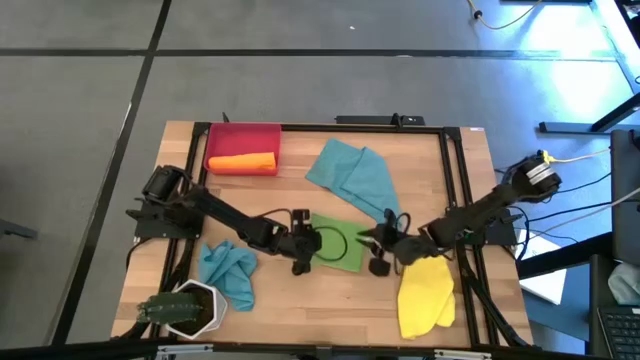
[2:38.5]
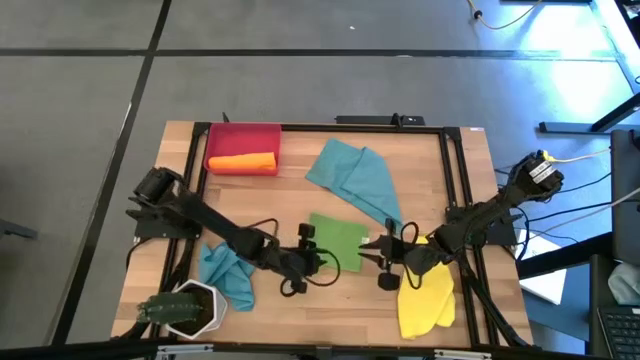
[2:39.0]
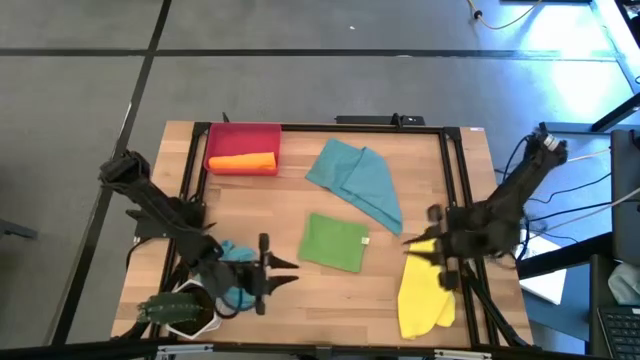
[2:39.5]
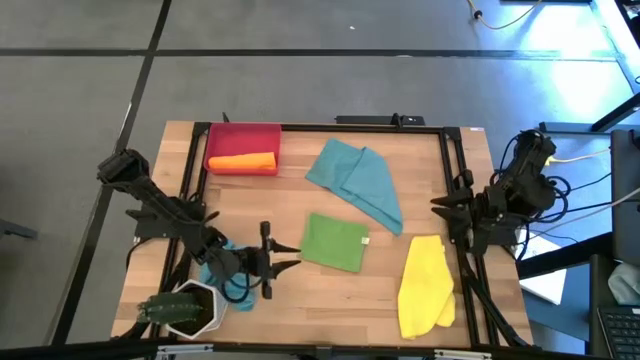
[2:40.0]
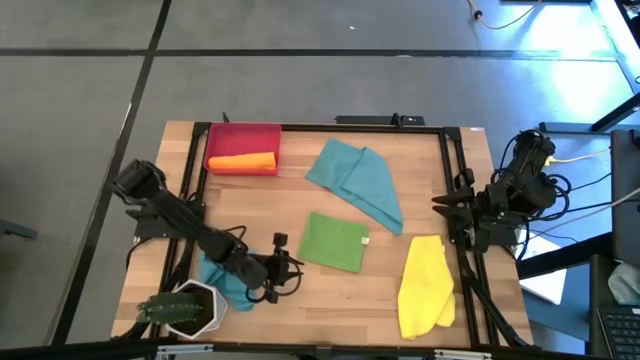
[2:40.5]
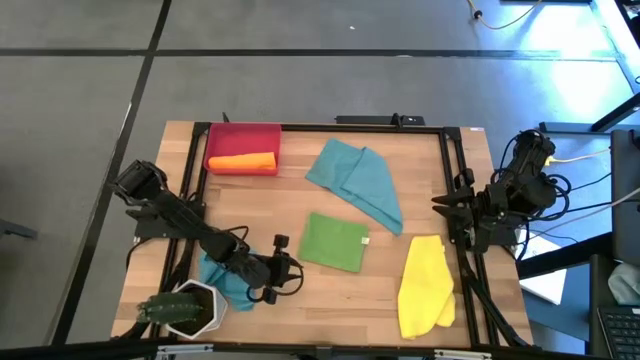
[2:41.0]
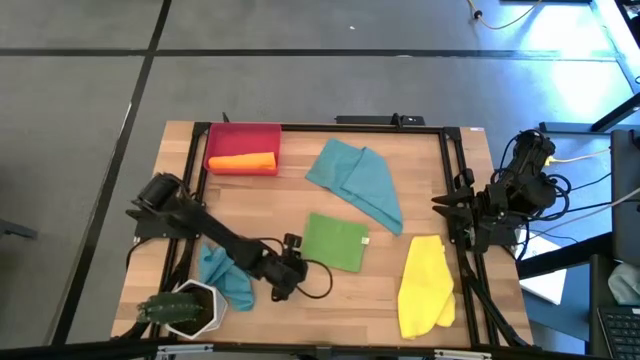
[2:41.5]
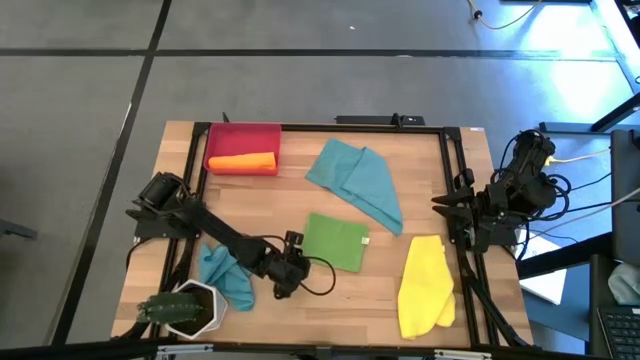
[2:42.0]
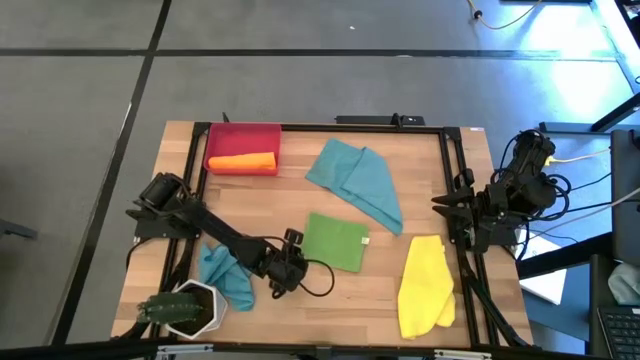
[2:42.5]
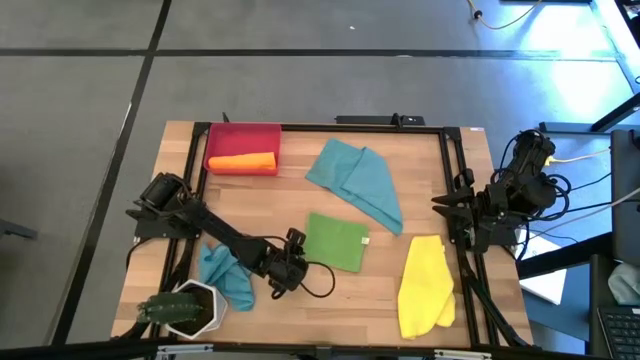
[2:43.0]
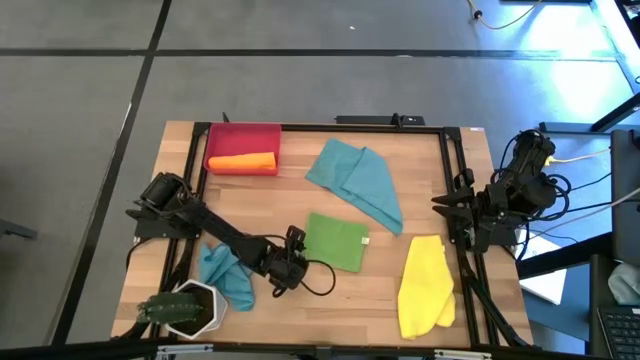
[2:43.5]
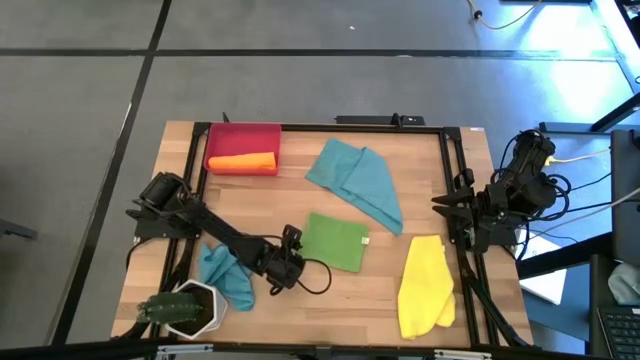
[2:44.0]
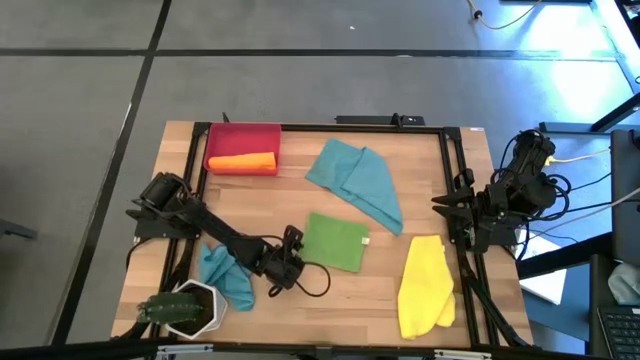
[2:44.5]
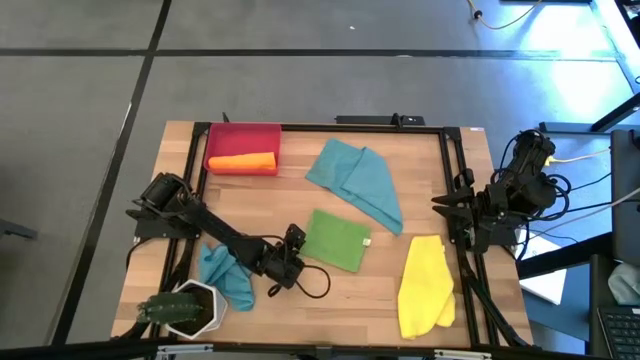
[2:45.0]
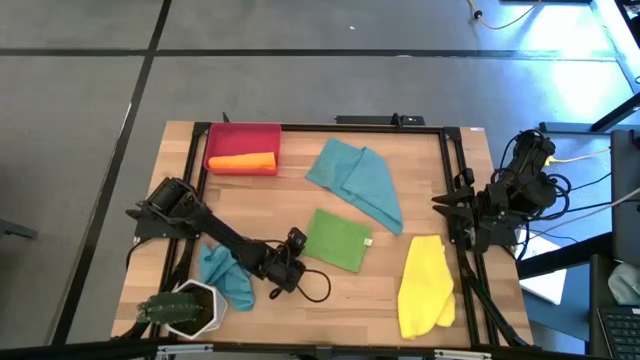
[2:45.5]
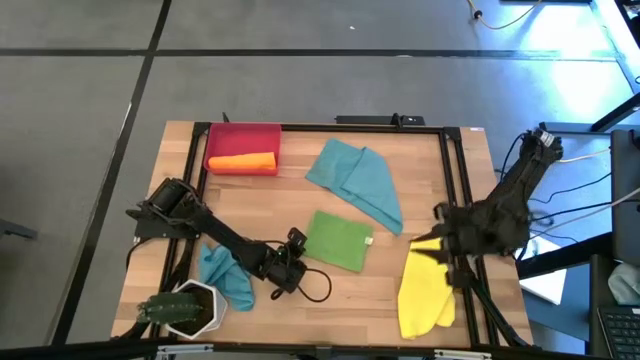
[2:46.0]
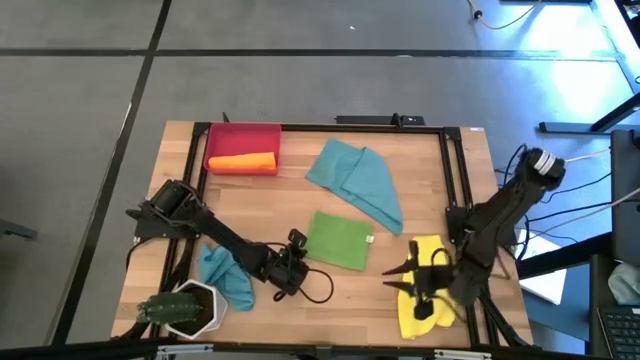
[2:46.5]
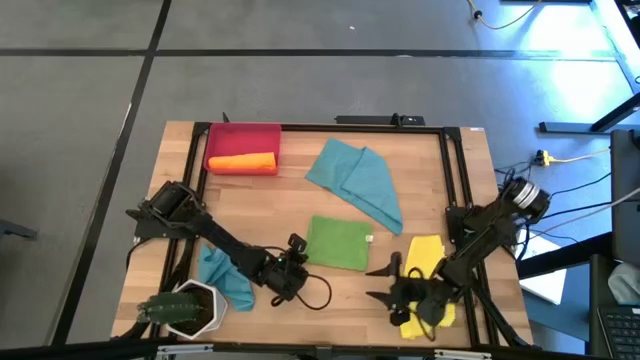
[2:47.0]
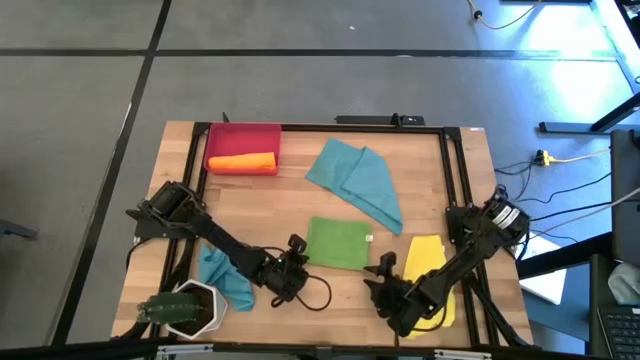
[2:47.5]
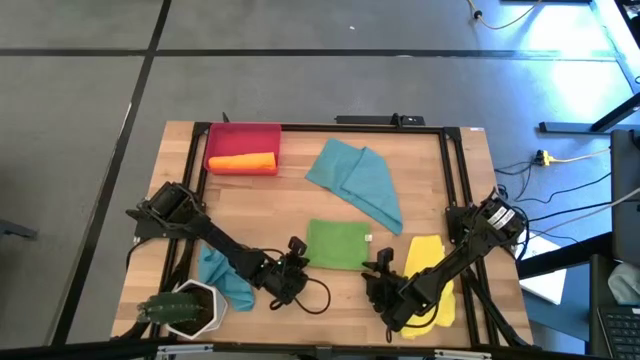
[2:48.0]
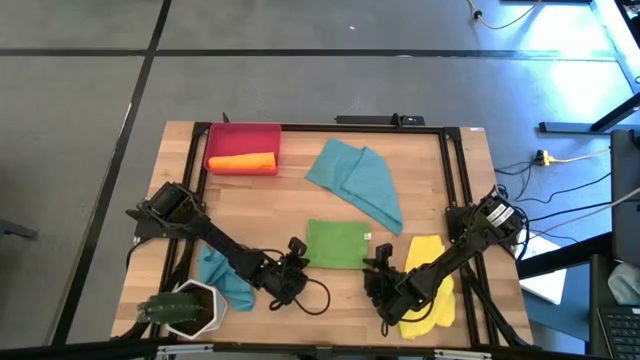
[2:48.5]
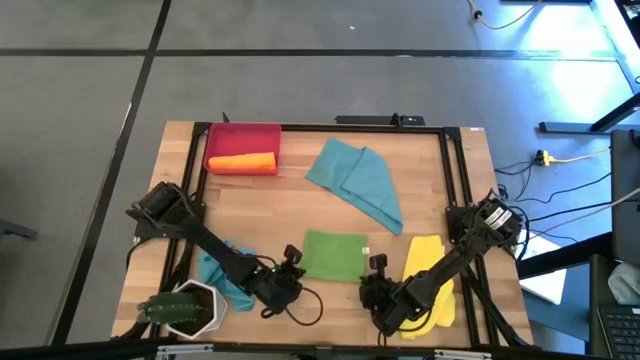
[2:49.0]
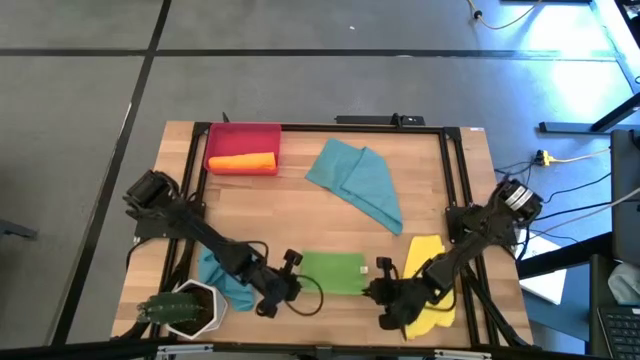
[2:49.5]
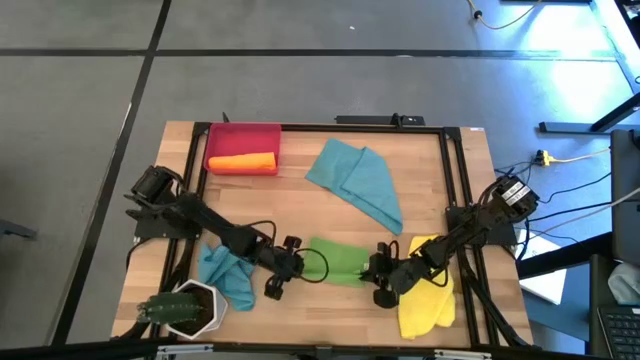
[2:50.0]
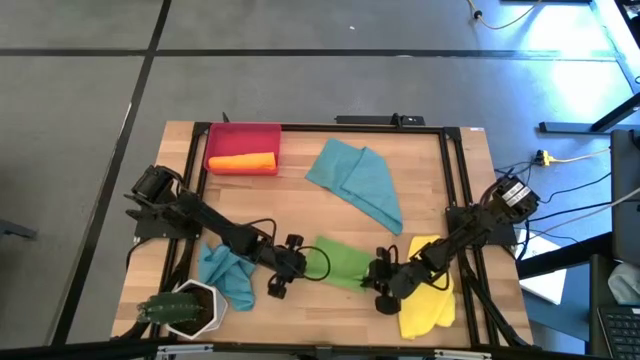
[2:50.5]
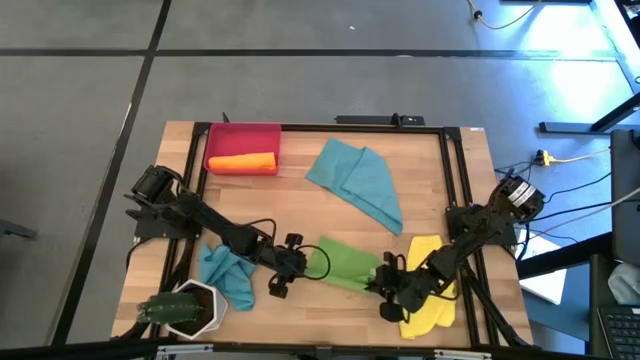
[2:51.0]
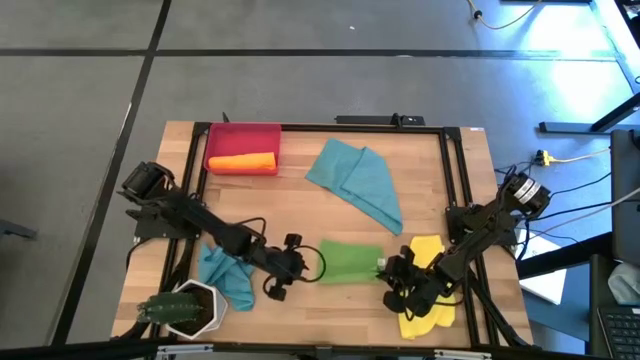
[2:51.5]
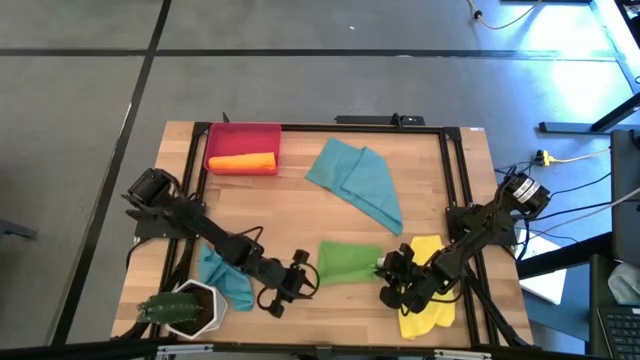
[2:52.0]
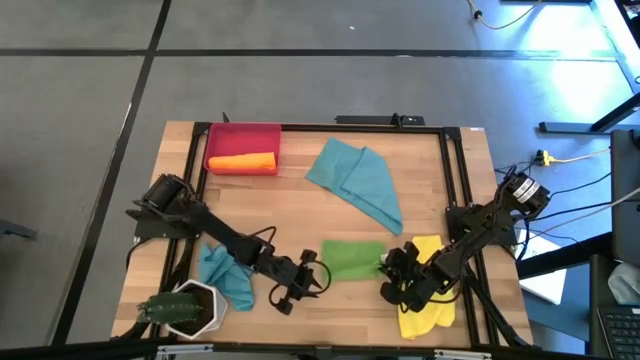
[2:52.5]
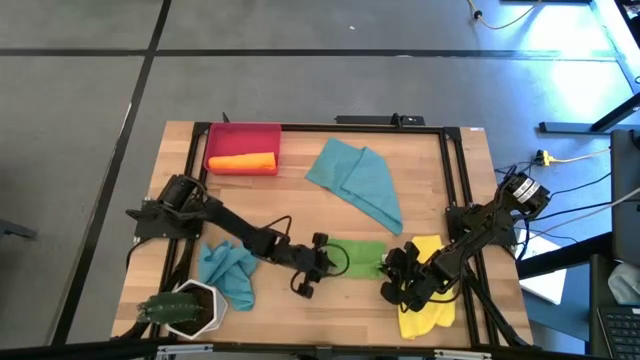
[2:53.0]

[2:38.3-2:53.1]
Task: Roll microfiber towels into tight, uniform cylinder then place into a basket
Roll the green microfiber towel

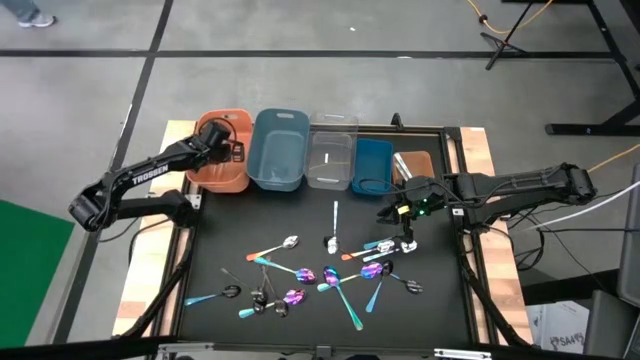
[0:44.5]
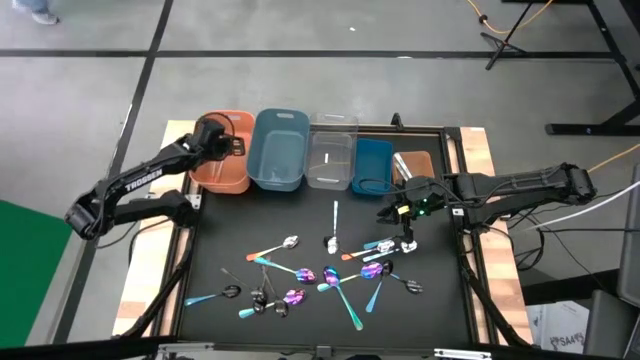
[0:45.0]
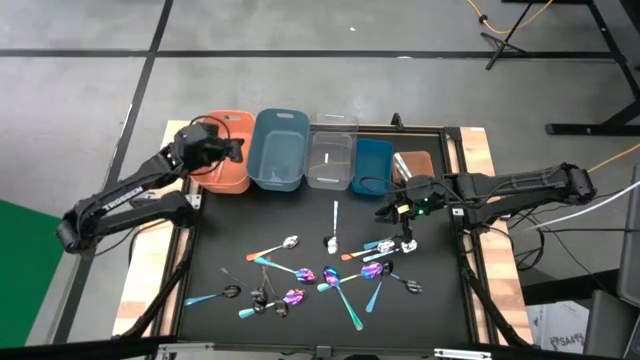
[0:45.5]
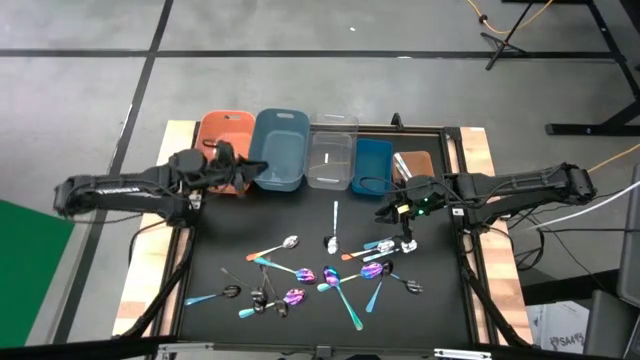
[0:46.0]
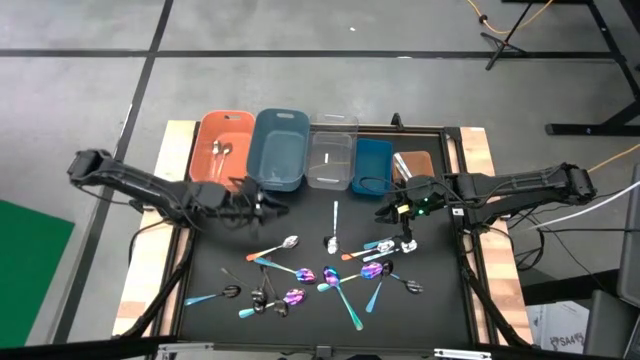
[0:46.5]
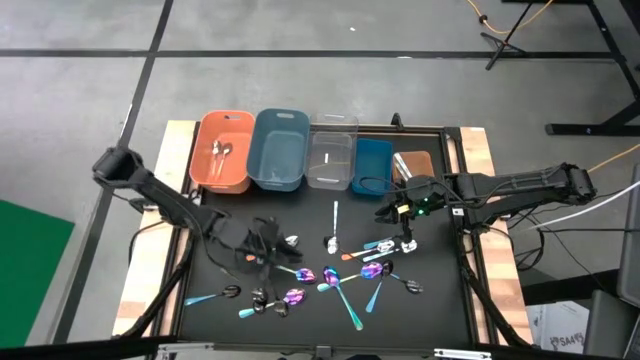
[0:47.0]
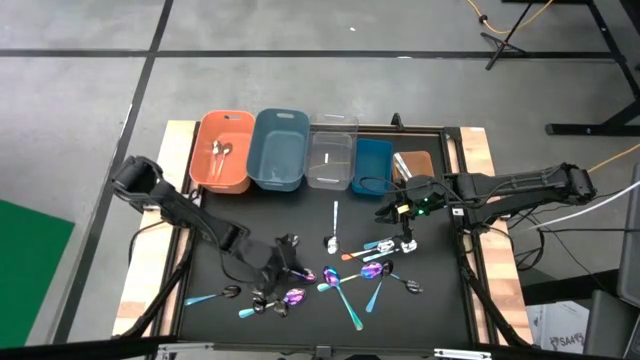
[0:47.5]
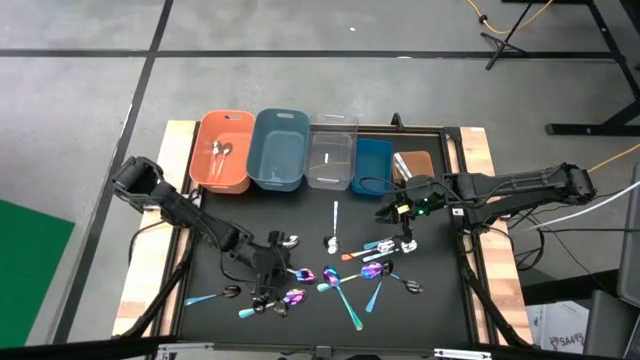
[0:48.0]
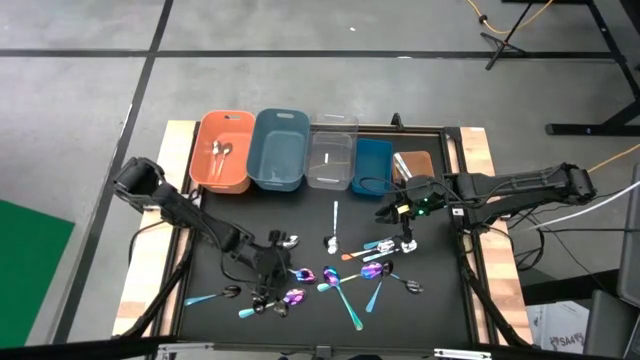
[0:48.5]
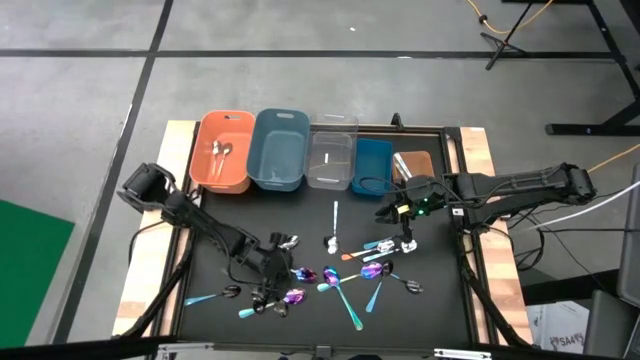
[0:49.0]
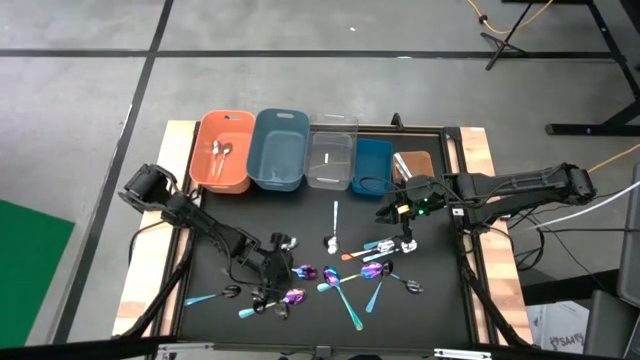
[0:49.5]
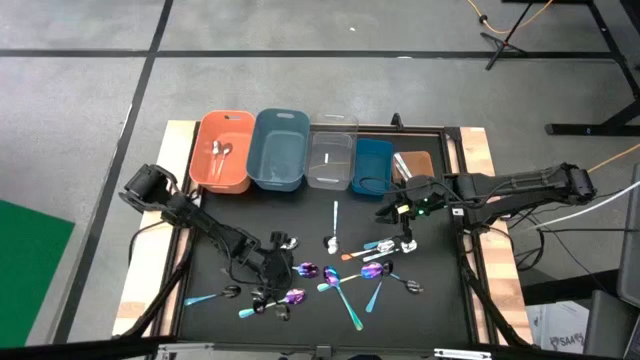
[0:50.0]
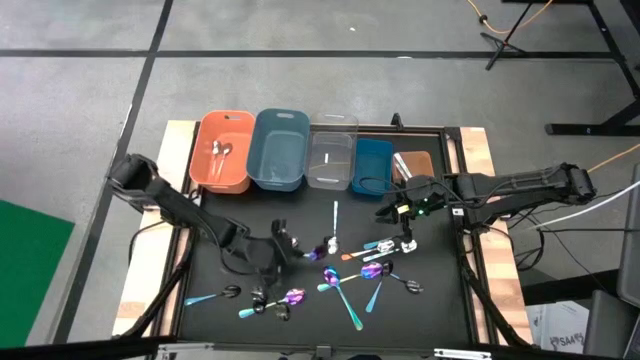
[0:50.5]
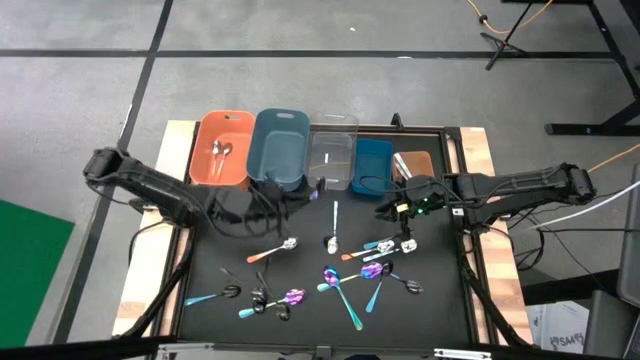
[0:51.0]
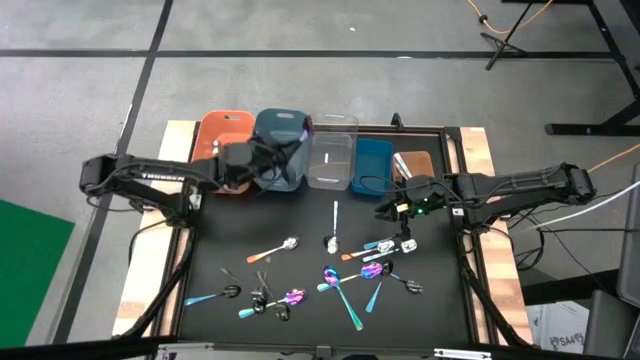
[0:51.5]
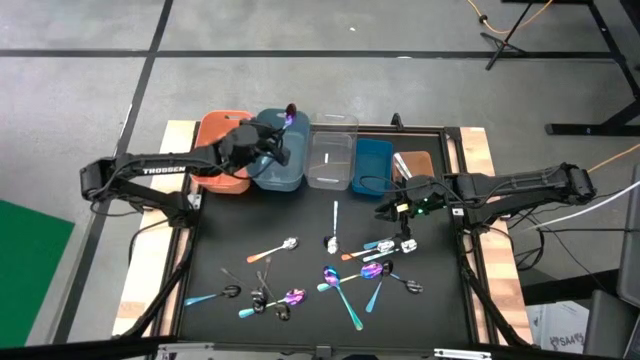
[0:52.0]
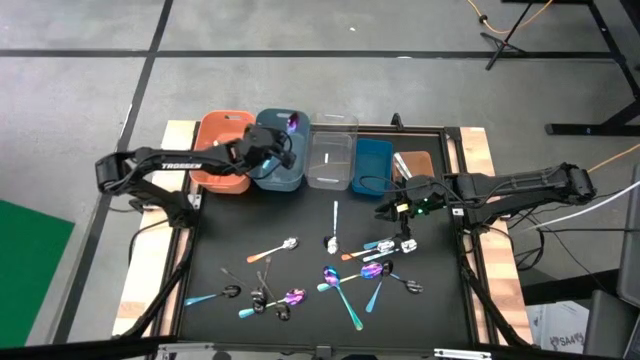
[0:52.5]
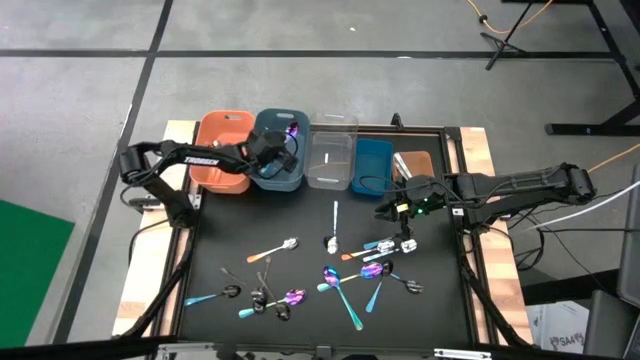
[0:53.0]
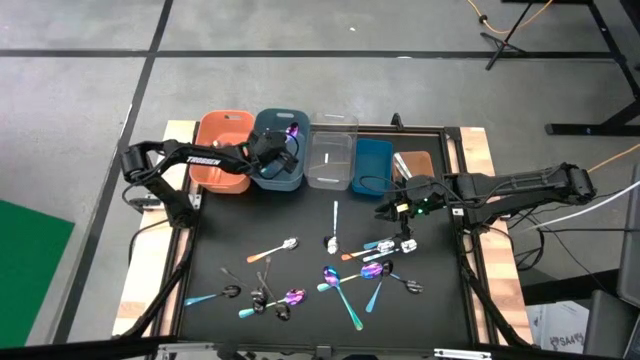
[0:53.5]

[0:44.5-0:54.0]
Task: Sort silverware by color (type)
Put the purple spoon into the left blue bin
